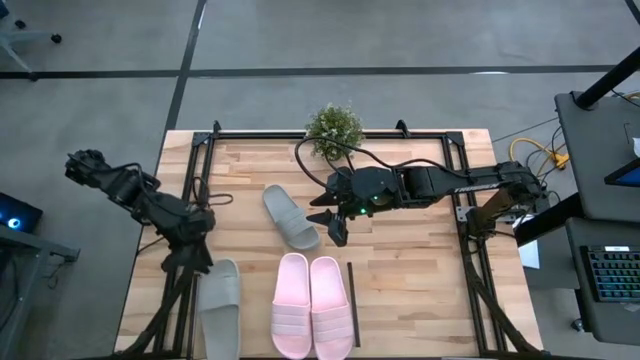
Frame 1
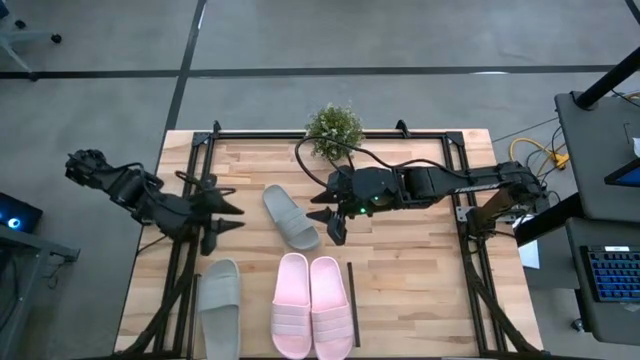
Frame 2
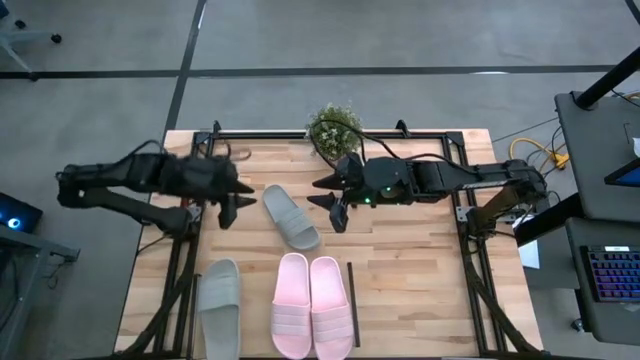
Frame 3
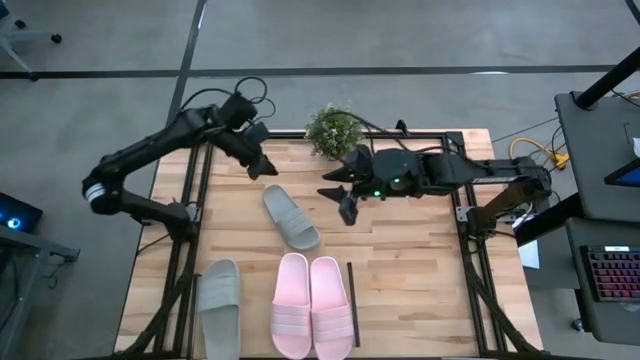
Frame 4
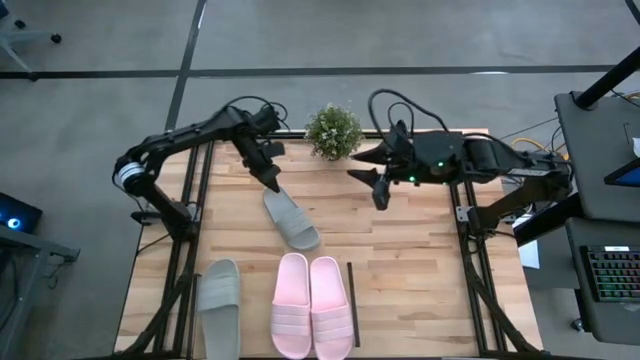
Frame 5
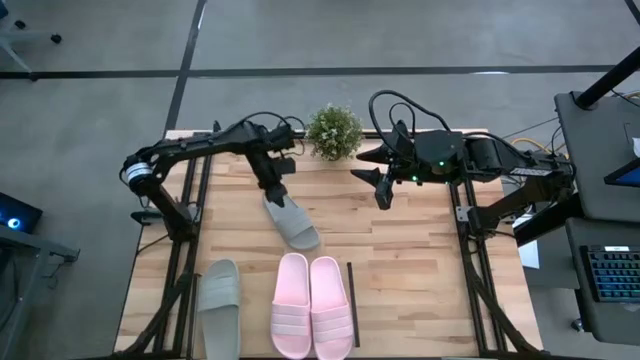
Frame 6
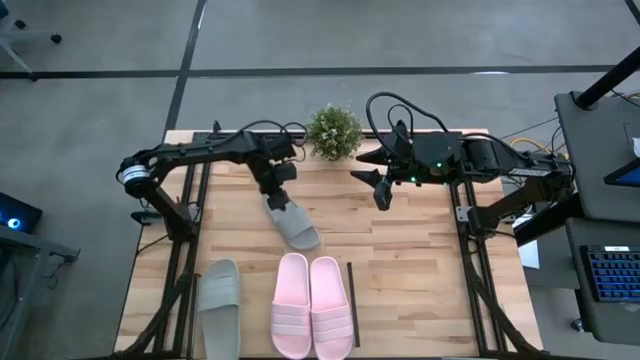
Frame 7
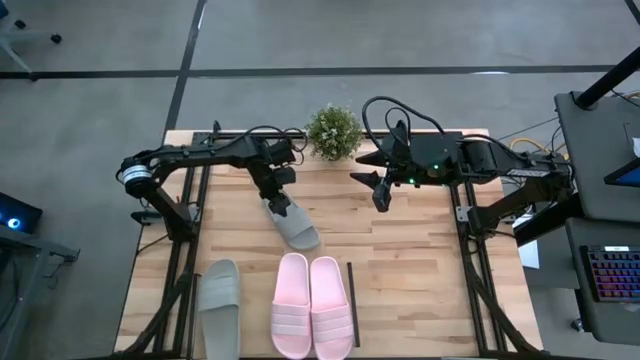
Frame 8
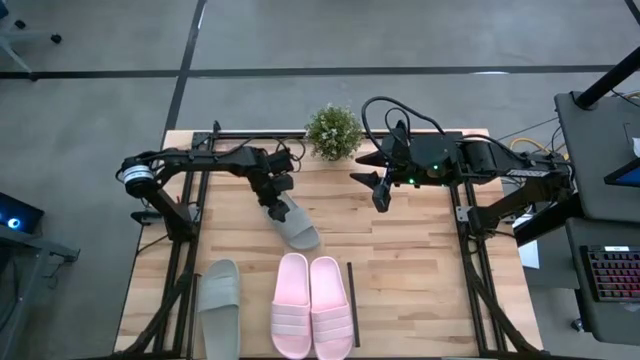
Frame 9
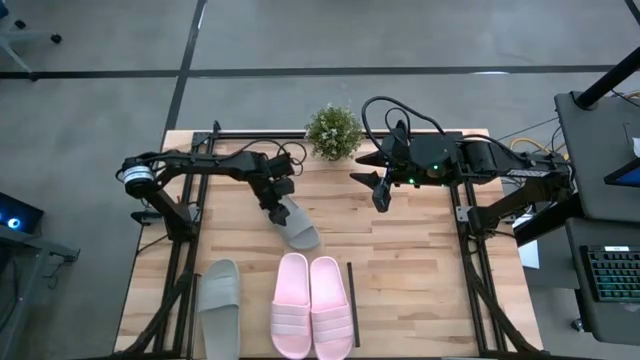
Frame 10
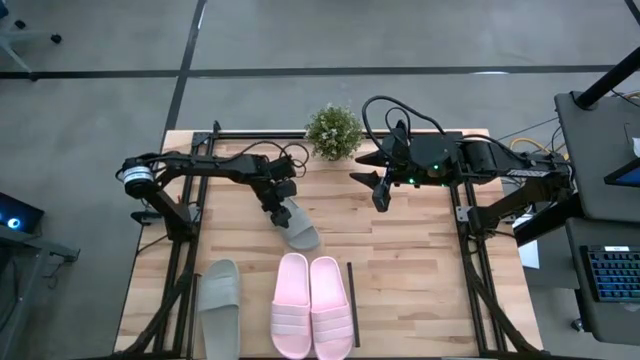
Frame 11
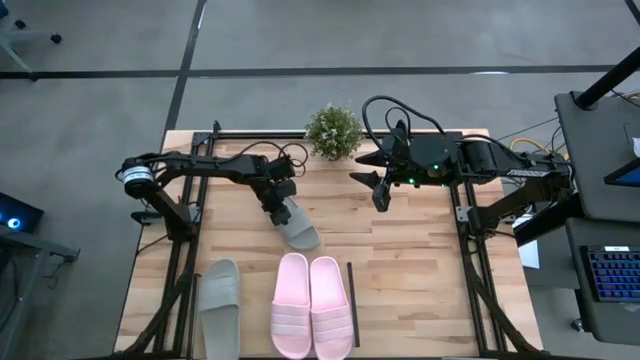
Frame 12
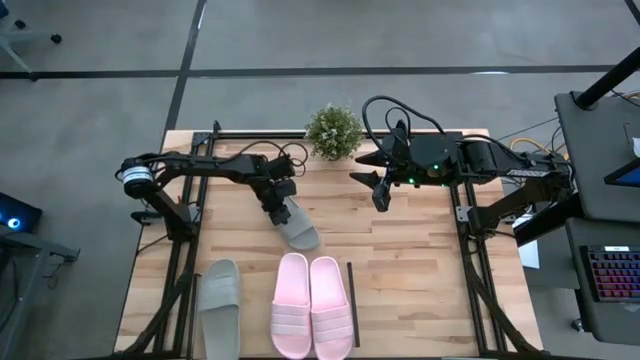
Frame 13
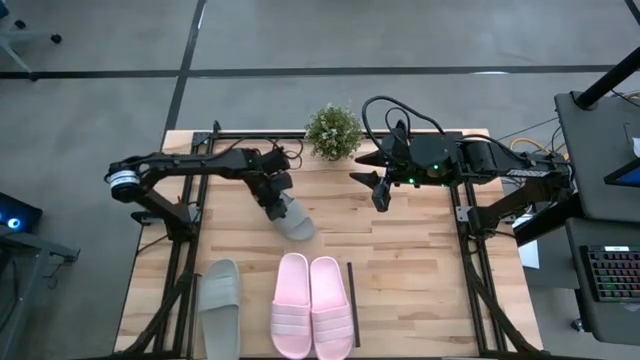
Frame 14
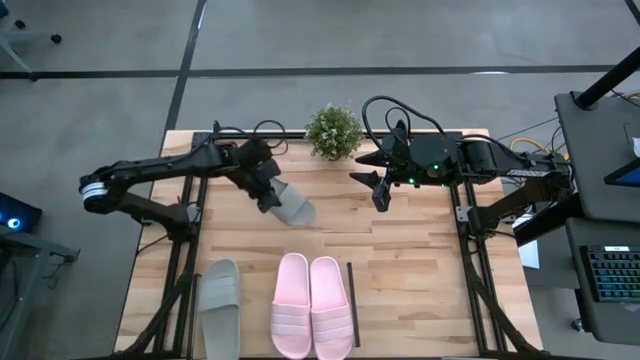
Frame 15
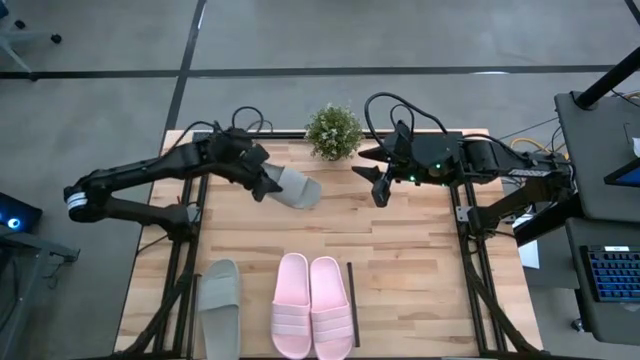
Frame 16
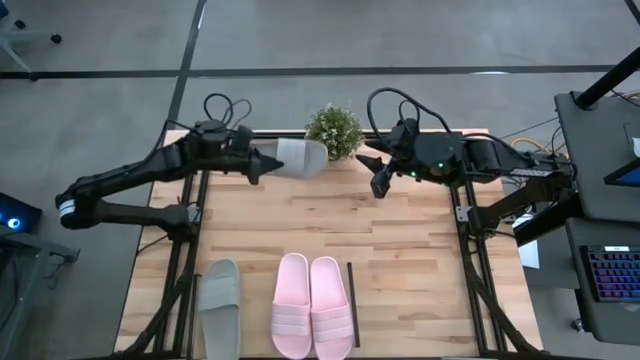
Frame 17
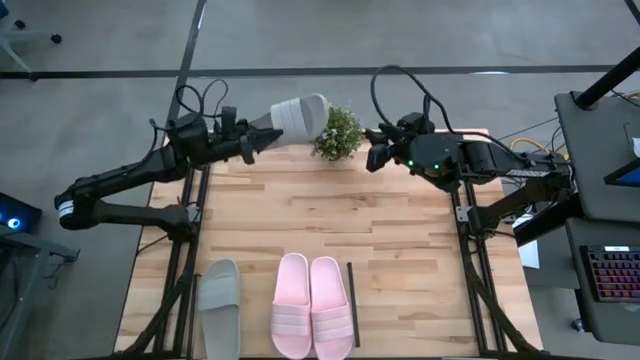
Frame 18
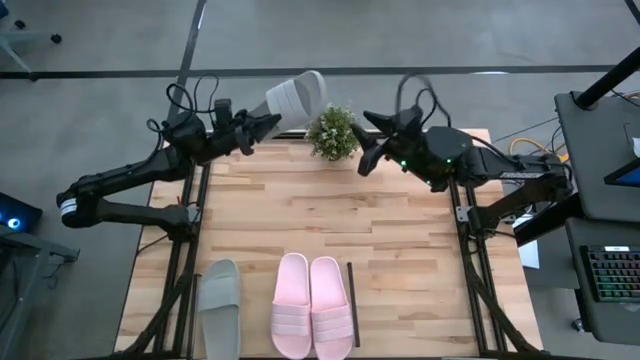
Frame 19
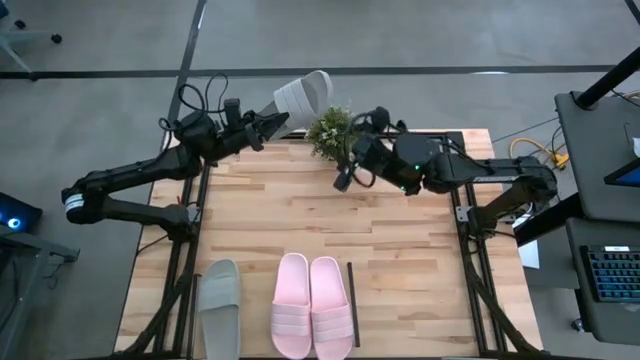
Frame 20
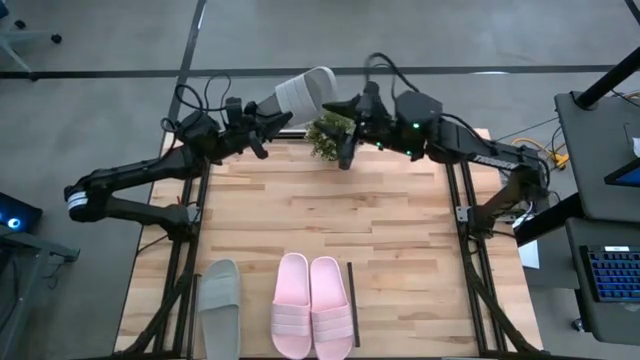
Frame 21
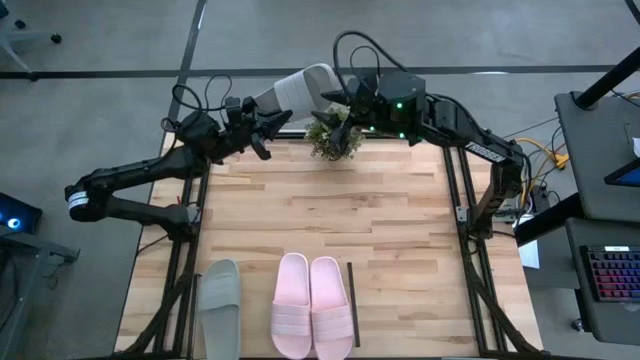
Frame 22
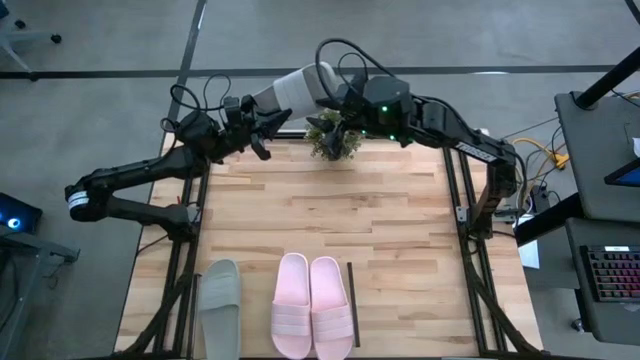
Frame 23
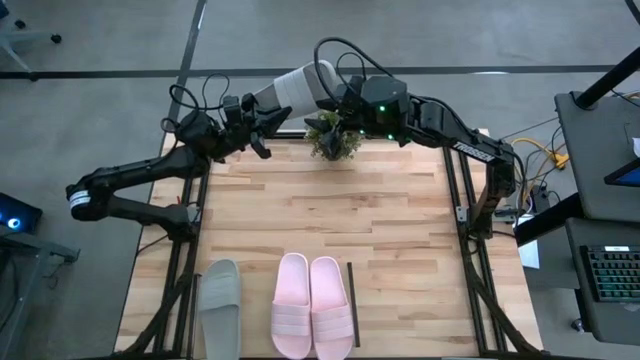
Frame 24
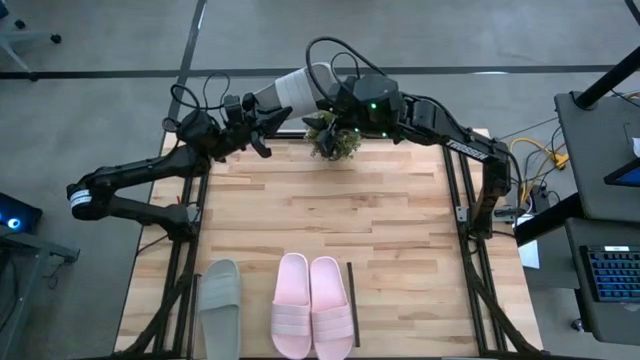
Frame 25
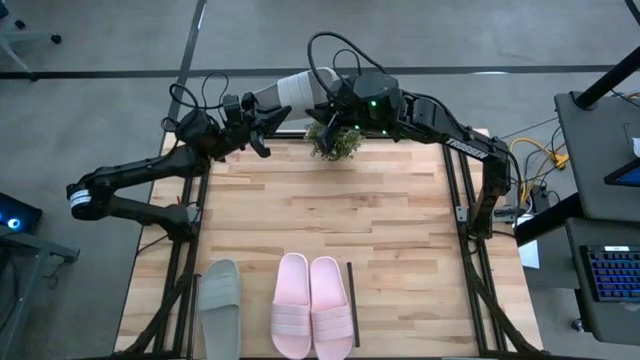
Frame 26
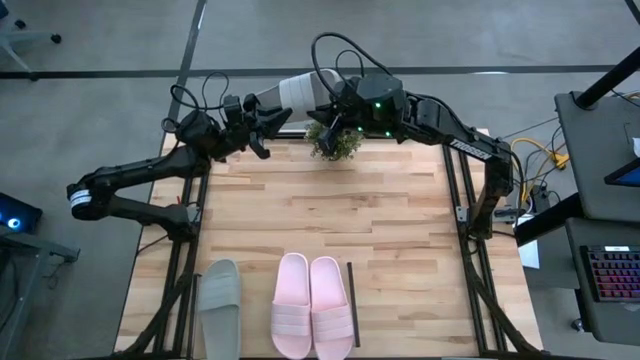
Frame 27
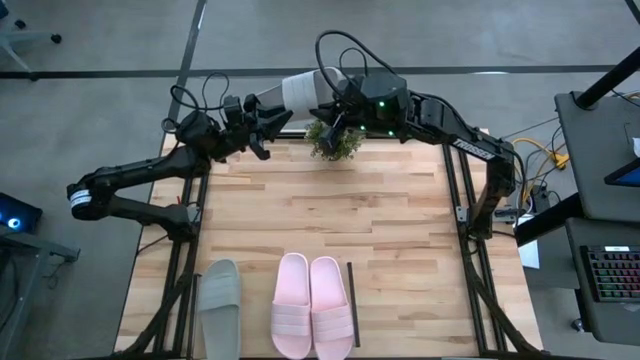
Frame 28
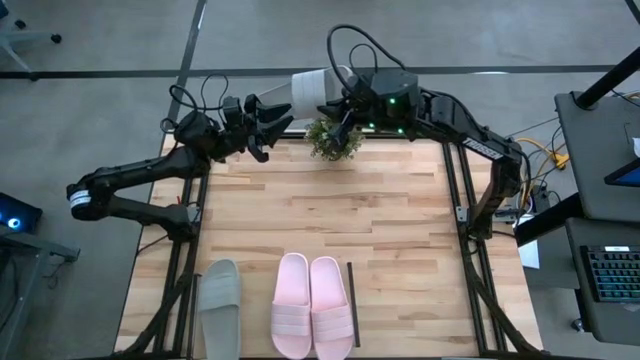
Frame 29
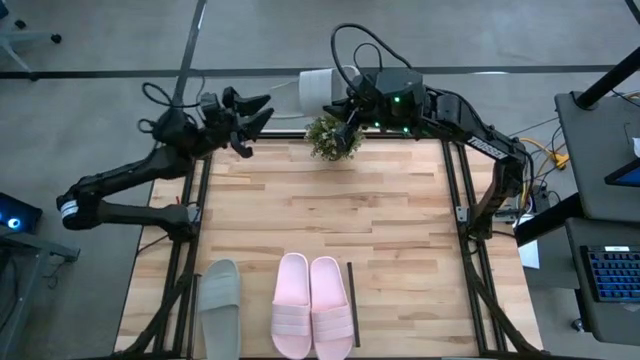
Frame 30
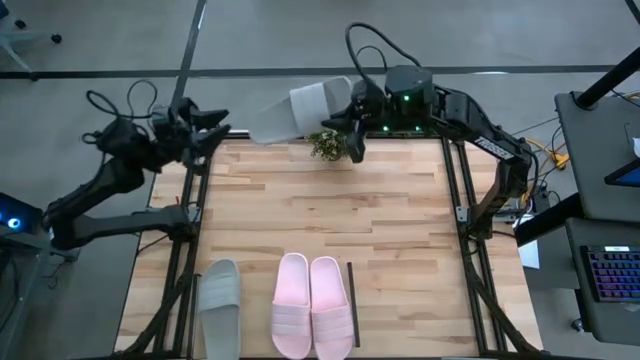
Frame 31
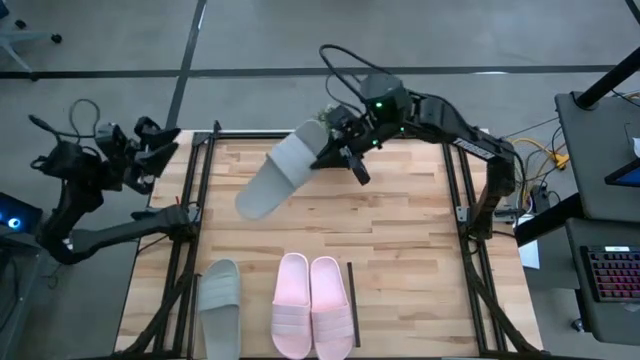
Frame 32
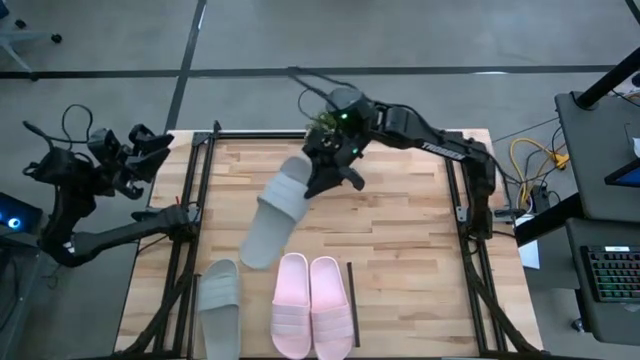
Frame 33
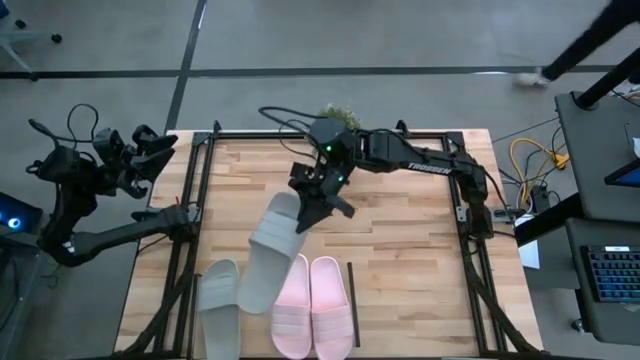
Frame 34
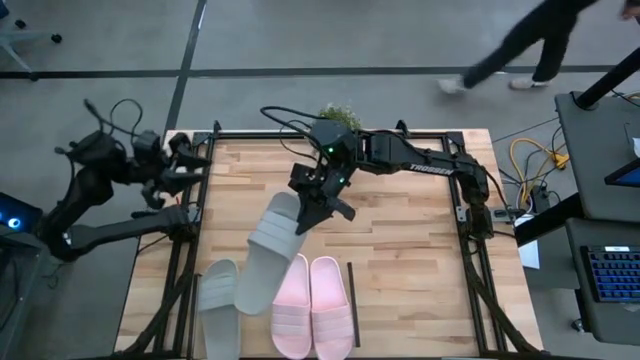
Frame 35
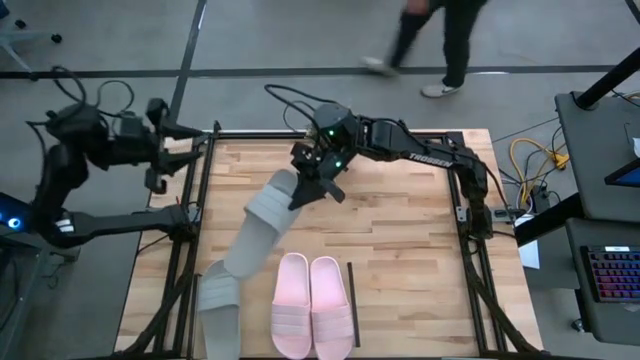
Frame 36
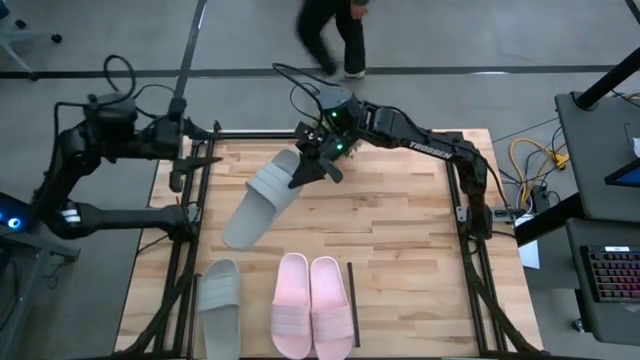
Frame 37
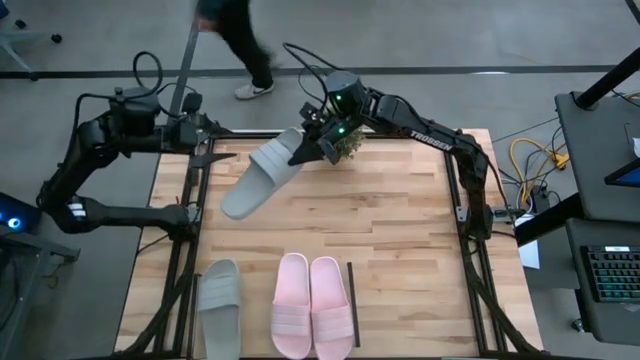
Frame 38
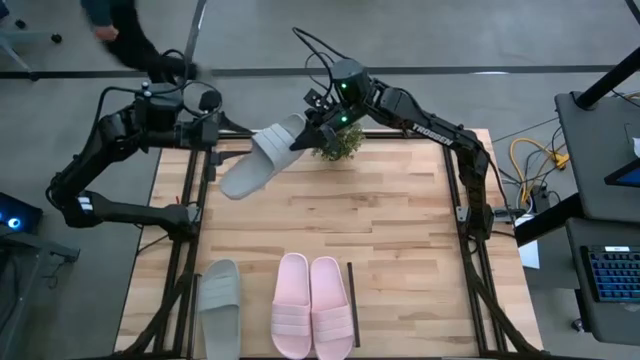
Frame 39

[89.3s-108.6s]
Task: Pick and place slides into the shelf
Put the gray slipper on the shelf

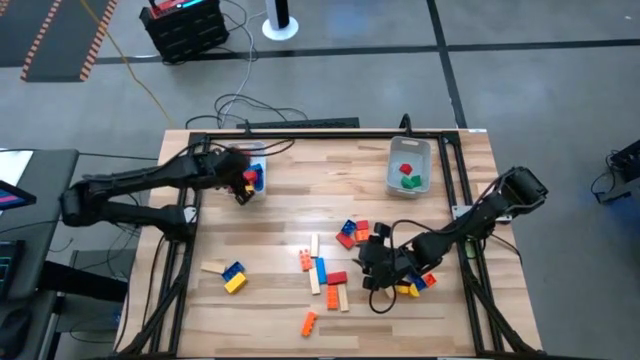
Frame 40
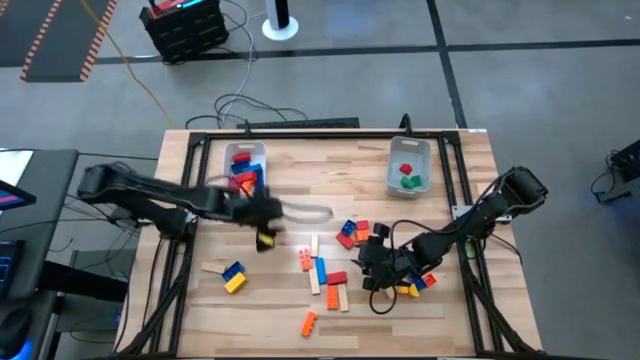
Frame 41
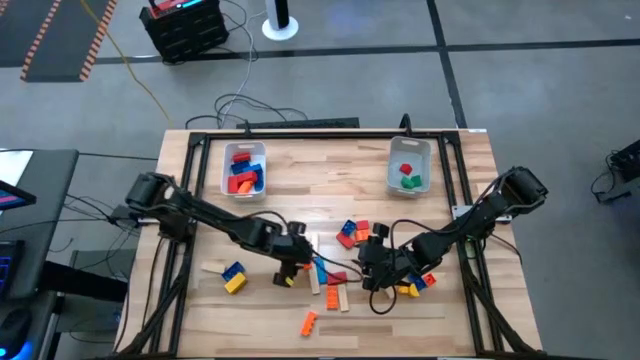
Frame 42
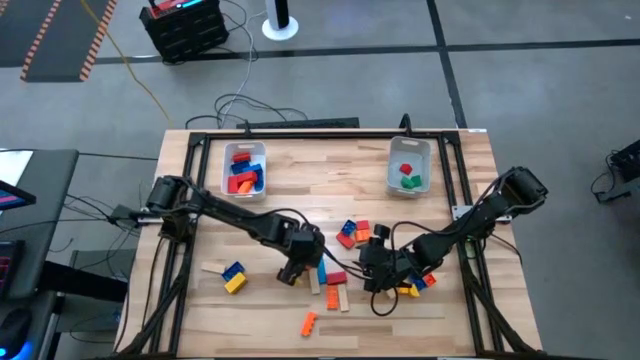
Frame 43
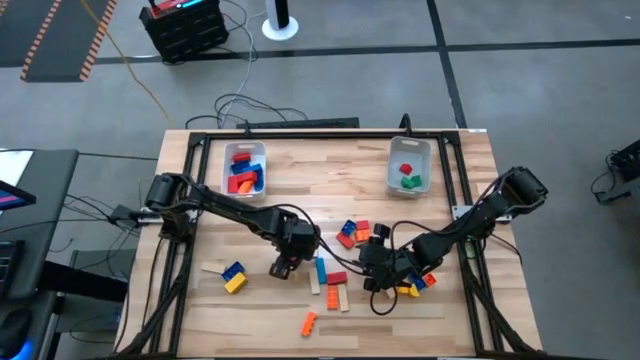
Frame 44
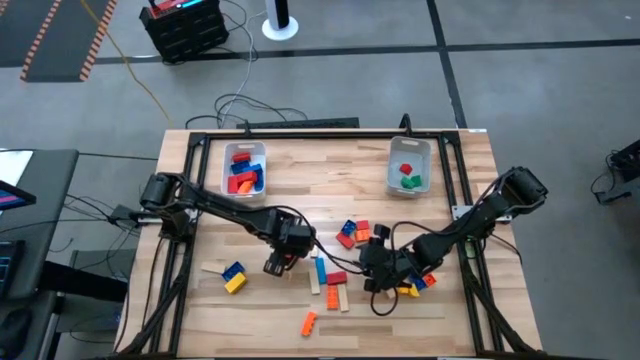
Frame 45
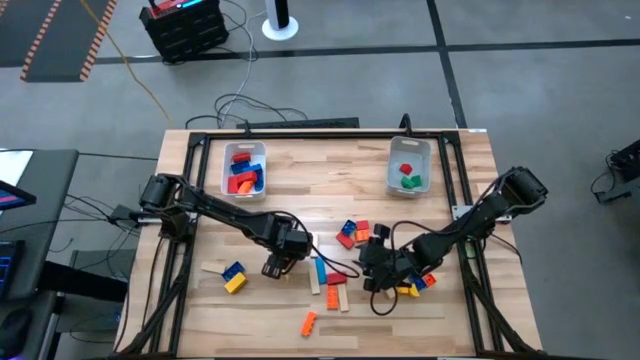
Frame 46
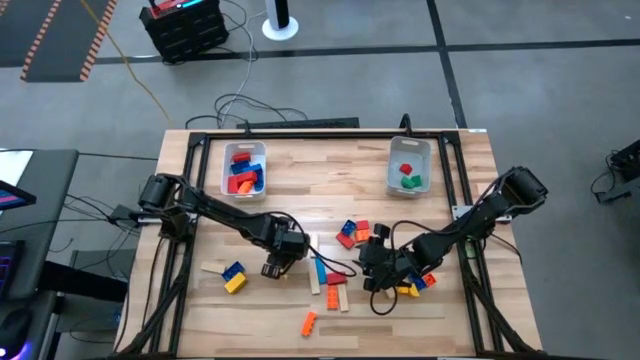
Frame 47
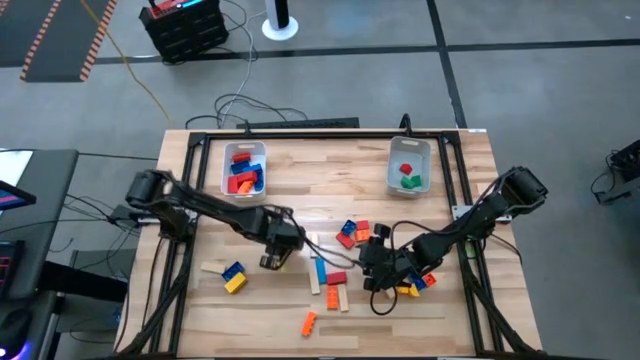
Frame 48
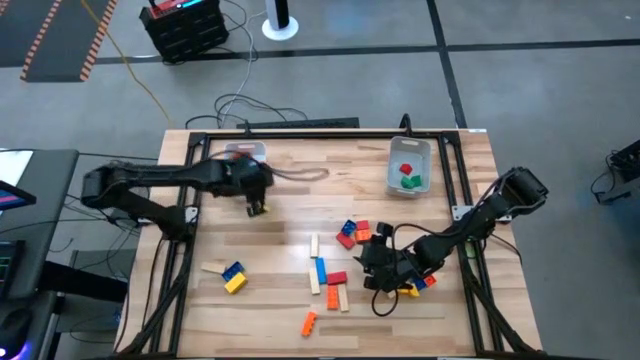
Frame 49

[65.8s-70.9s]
Task: Sort blocks by size
Put the large orange game piece into the white bin
